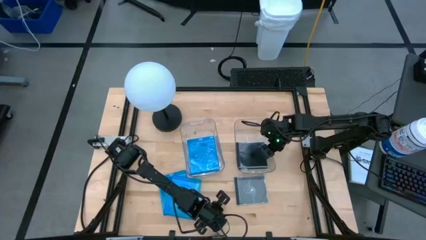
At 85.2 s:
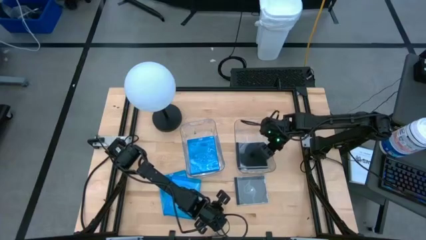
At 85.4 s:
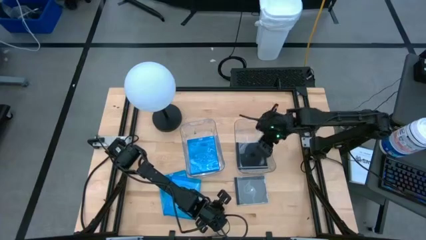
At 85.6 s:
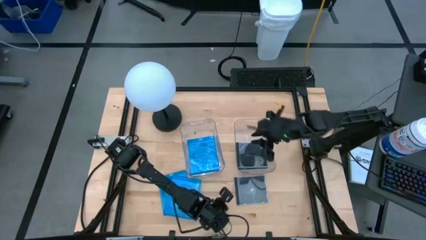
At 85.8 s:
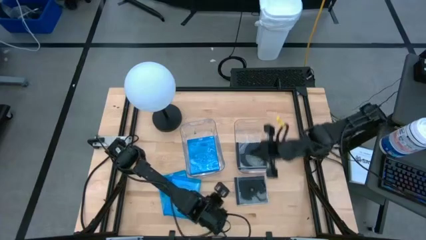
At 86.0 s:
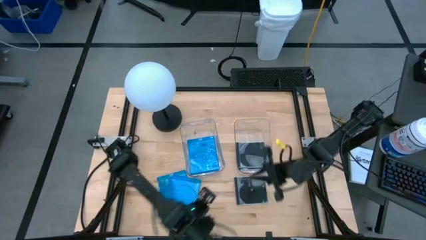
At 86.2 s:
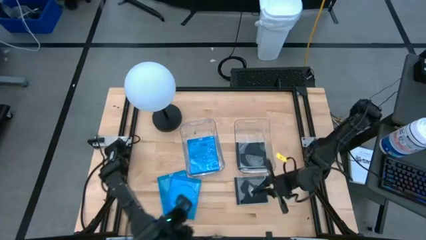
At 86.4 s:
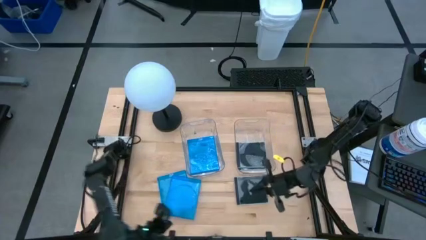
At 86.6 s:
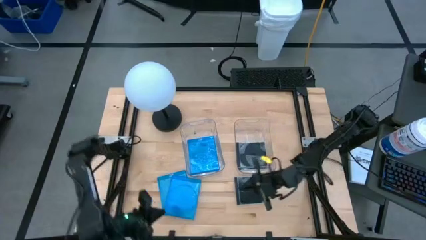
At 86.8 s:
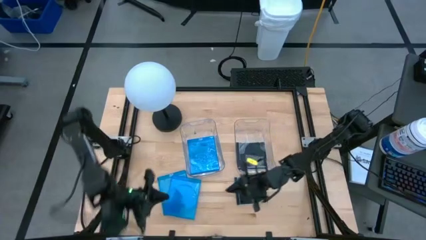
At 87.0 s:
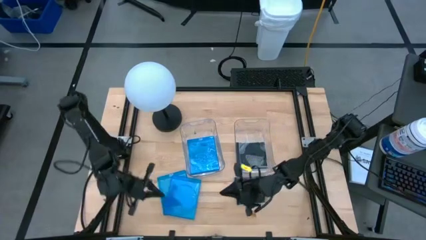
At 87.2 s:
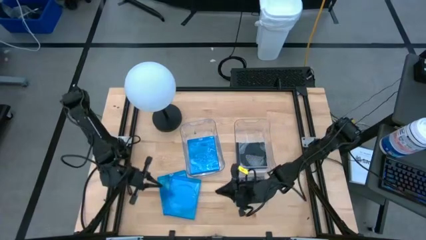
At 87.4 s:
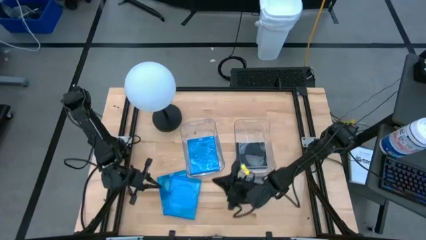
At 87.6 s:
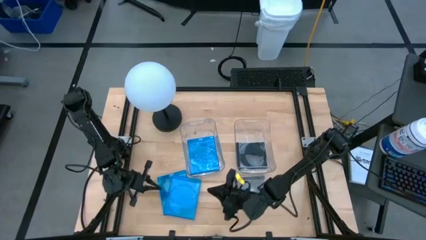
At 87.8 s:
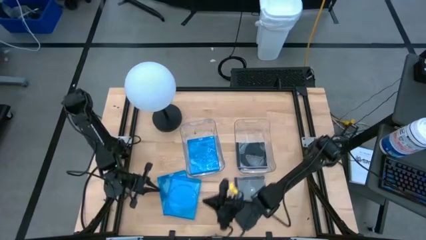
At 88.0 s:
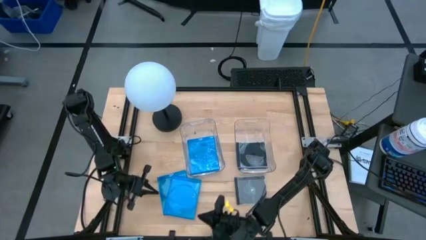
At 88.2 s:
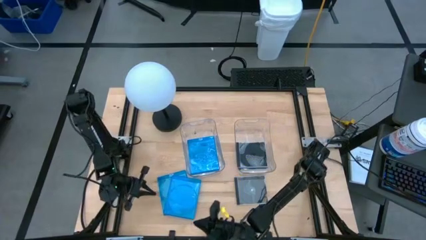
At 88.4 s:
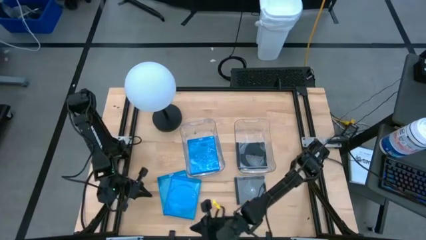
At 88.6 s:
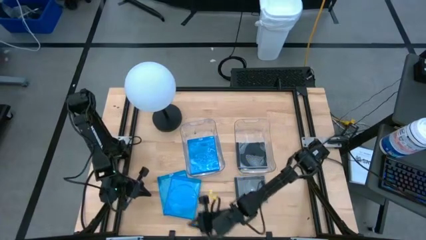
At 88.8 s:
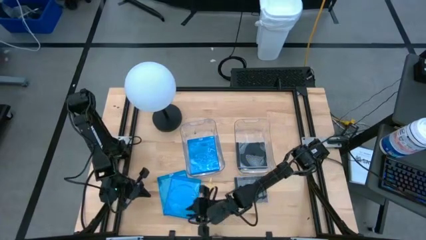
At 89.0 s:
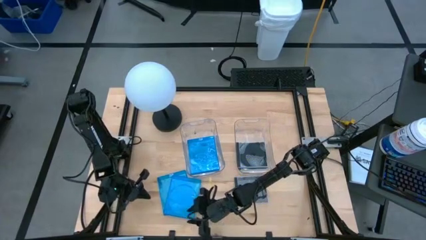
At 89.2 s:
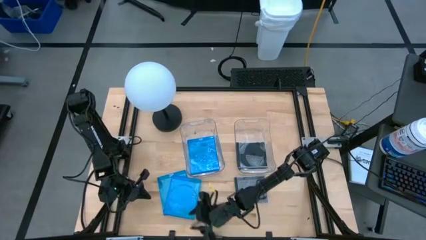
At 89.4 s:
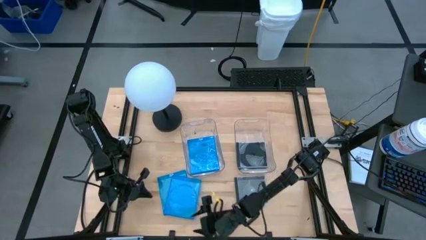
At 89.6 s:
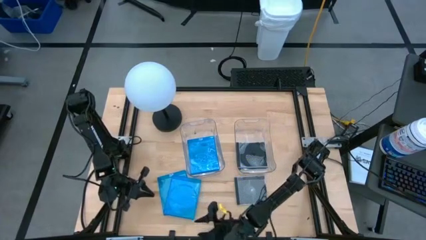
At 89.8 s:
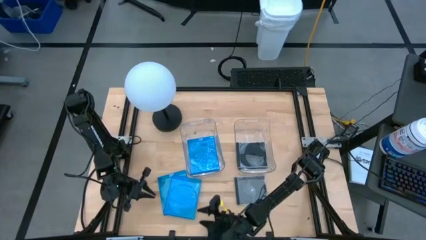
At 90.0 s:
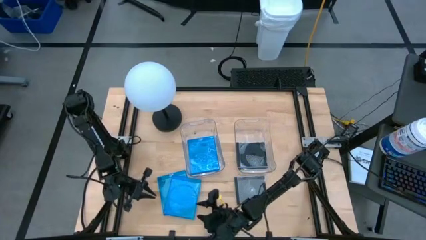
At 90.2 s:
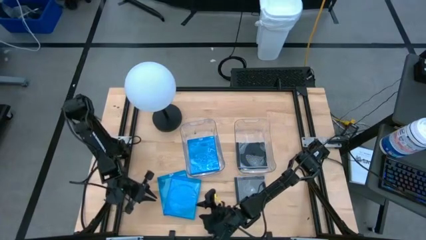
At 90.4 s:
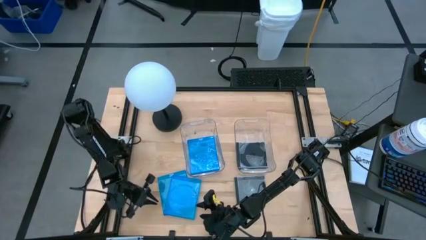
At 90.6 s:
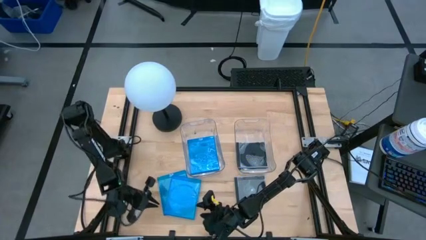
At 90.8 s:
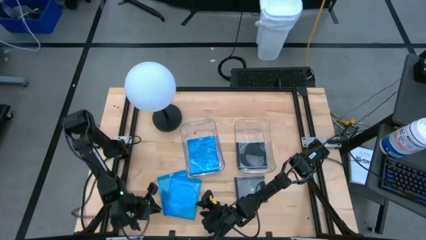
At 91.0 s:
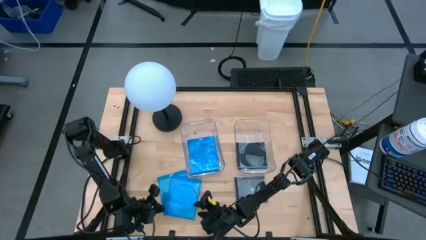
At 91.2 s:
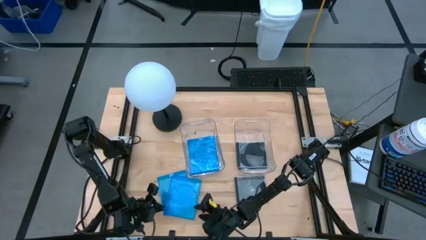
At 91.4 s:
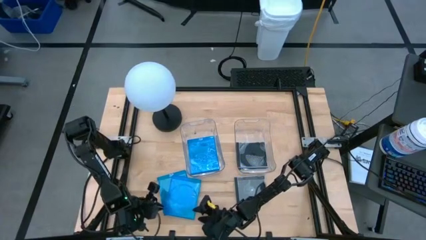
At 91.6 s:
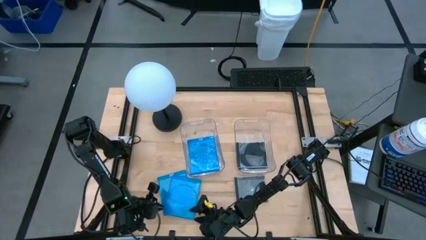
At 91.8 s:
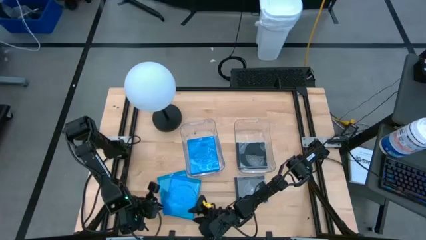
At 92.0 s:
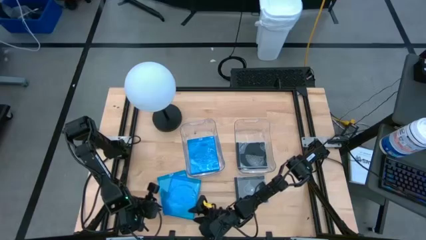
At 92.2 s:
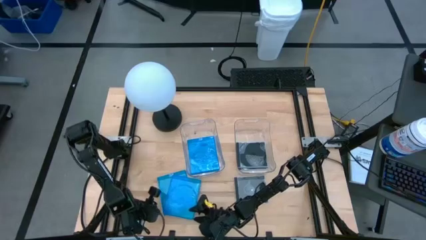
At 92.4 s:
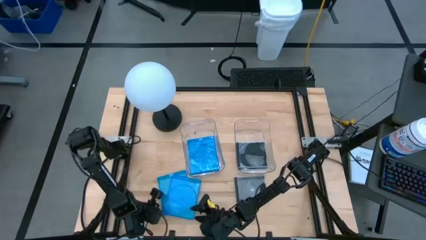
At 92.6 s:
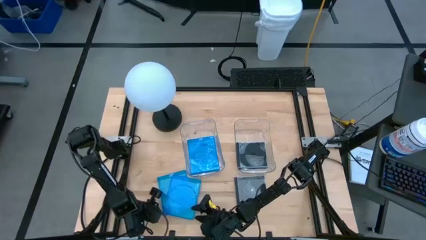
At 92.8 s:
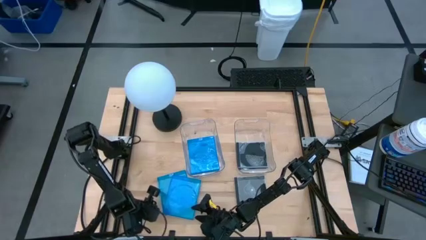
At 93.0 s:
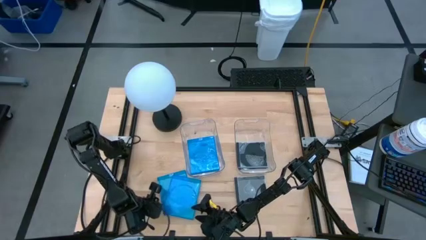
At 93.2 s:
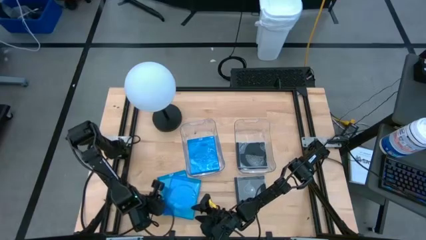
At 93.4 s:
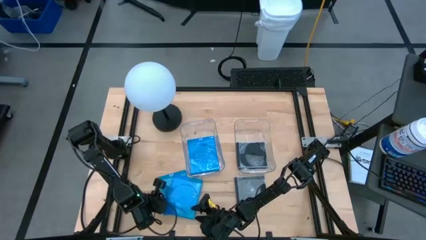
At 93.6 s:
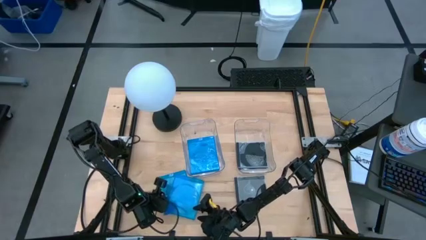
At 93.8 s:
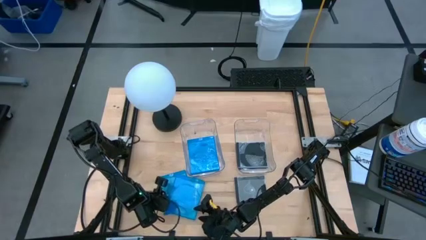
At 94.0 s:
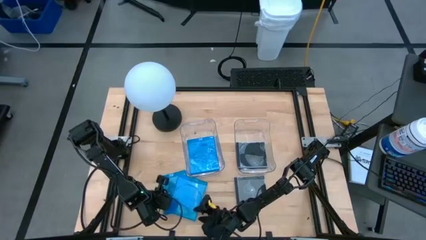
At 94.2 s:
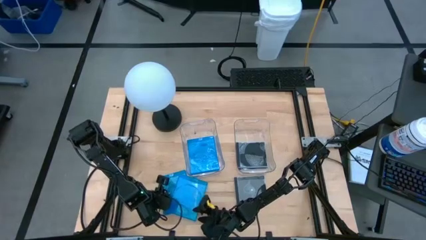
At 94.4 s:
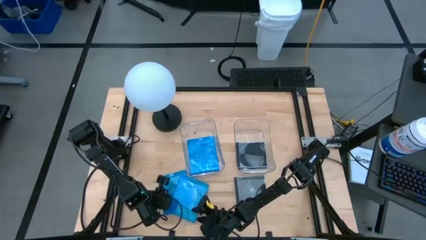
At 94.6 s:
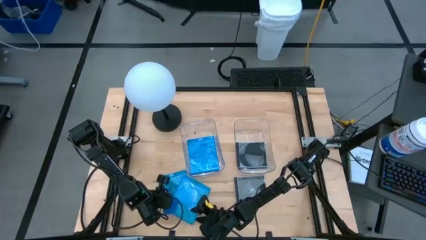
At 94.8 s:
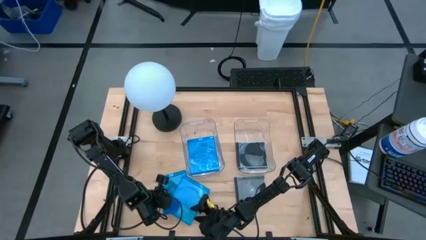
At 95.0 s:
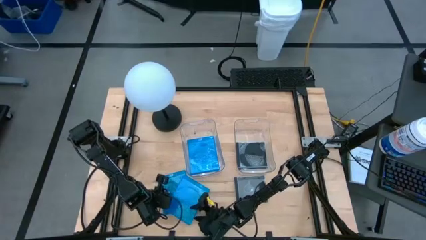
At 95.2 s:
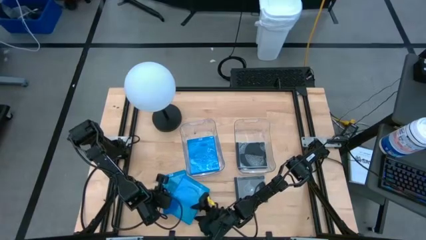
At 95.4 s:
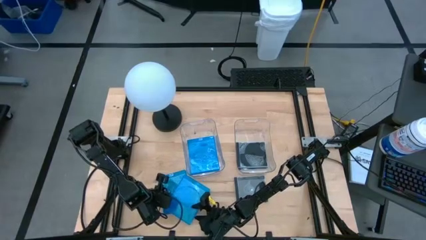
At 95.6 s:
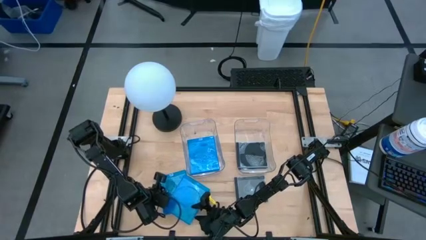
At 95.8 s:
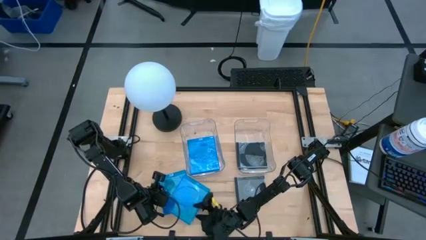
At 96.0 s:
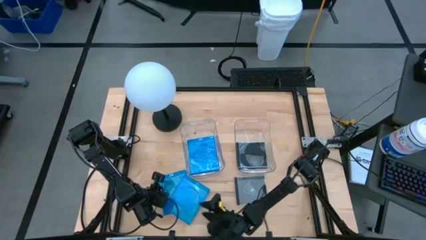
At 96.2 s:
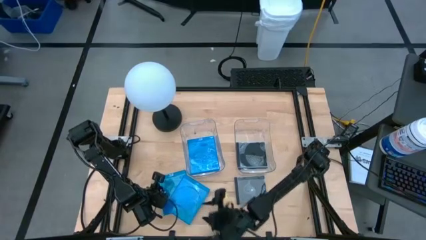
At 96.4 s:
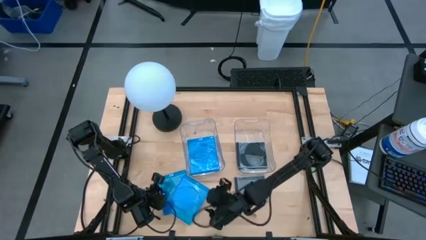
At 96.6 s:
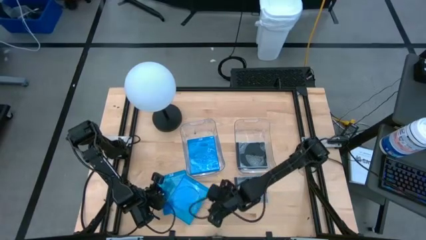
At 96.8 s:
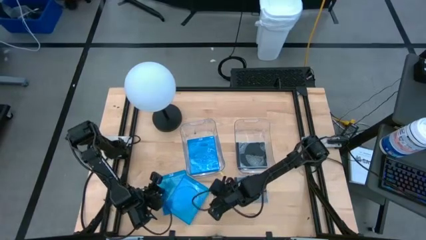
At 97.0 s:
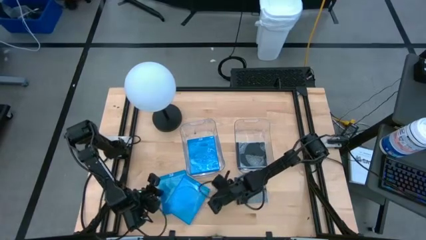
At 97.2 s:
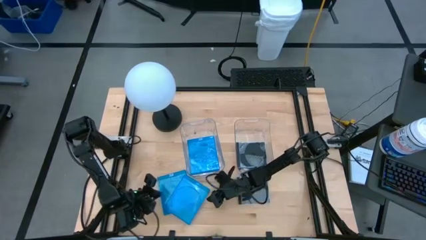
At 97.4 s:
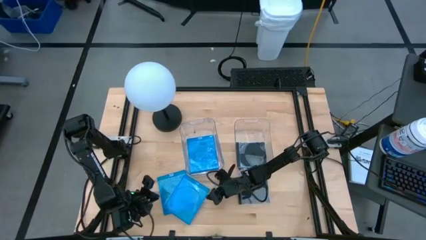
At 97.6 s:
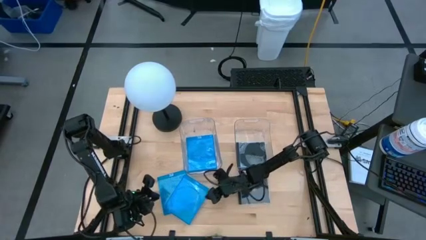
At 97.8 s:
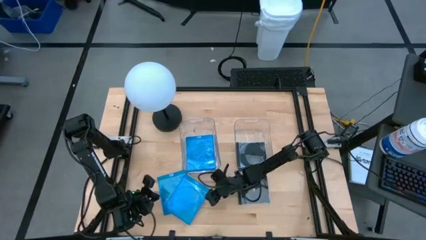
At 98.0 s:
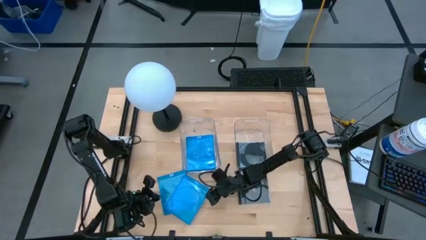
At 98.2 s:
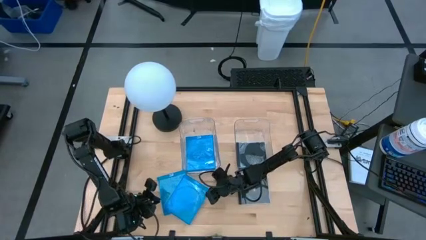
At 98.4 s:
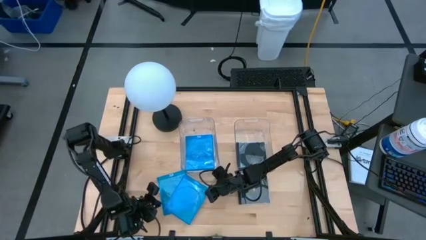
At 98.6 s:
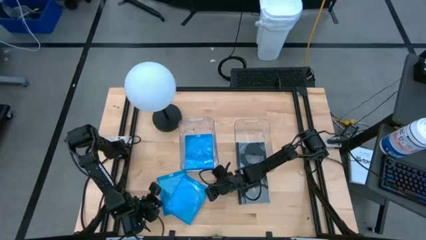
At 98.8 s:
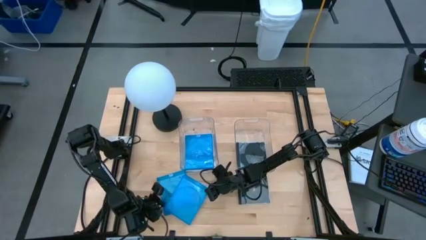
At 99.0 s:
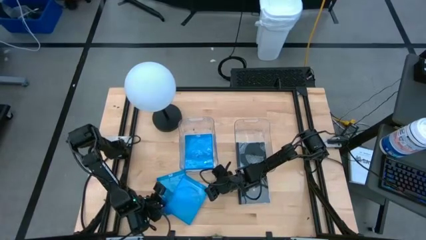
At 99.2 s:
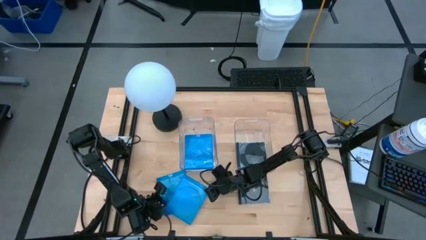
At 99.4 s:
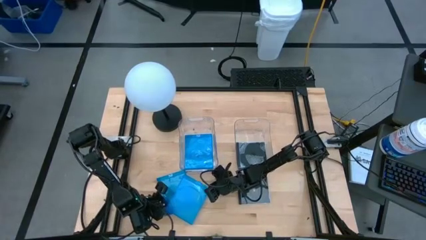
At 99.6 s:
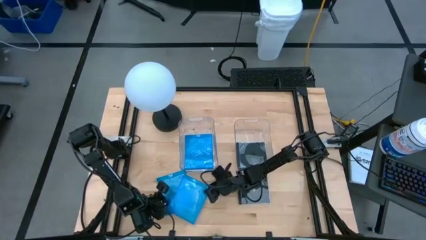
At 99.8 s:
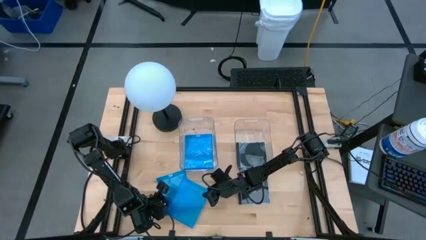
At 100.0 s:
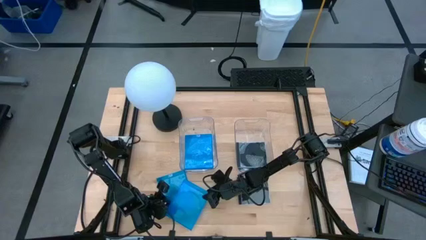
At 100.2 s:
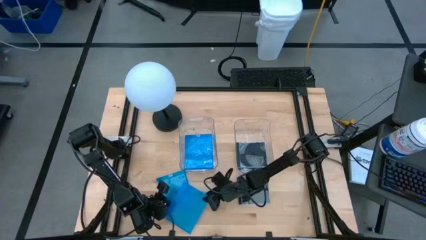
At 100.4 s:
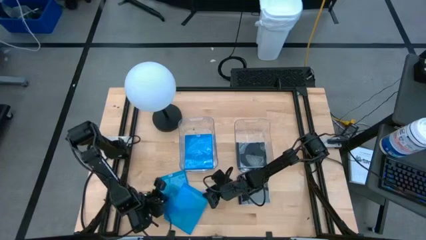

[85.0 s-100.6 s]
Task: Pick & place jewel cases by type
Put the blue CD case into the left transparent bin

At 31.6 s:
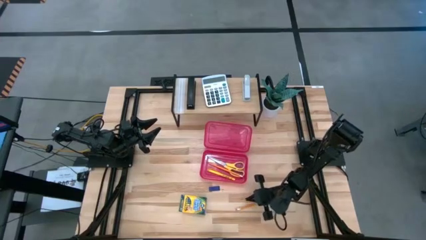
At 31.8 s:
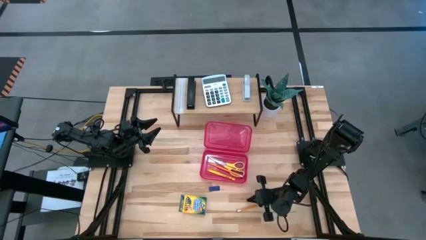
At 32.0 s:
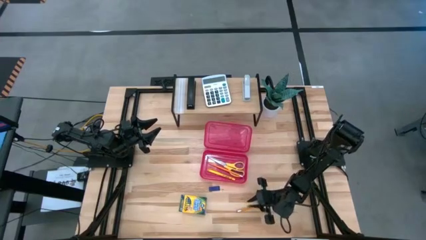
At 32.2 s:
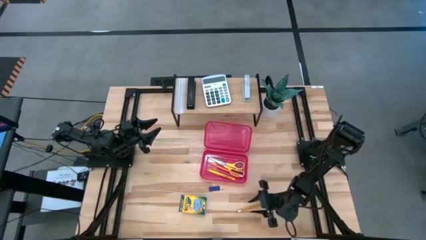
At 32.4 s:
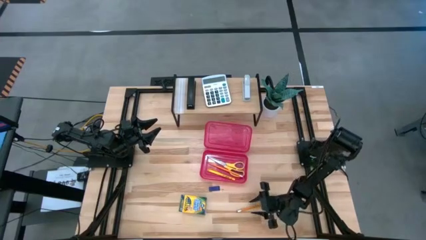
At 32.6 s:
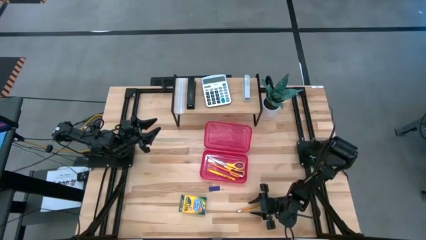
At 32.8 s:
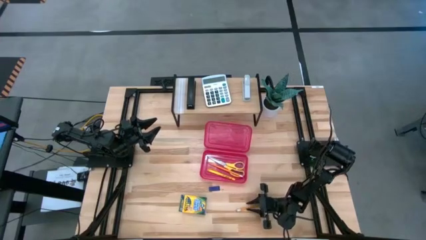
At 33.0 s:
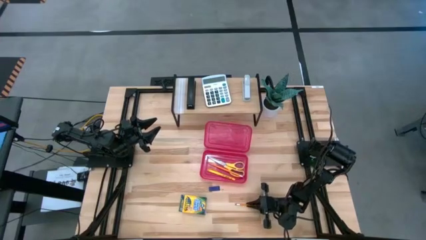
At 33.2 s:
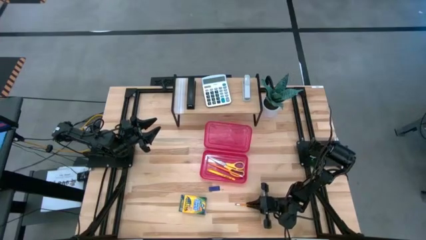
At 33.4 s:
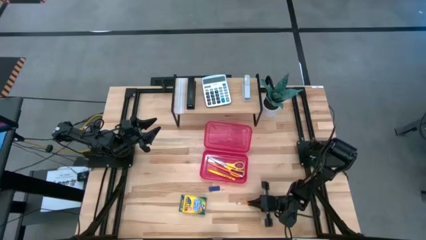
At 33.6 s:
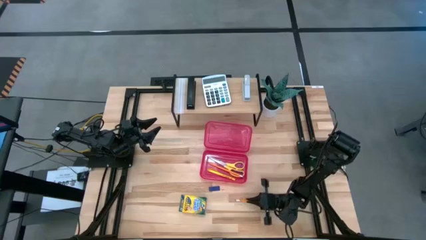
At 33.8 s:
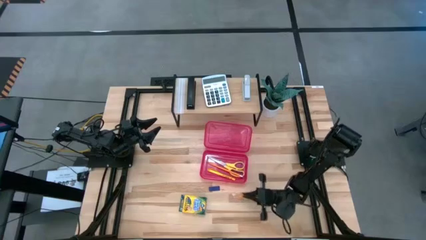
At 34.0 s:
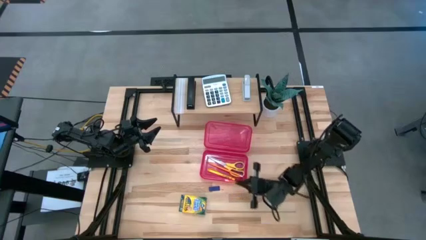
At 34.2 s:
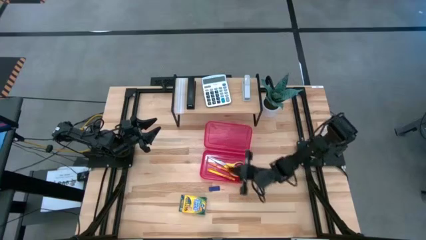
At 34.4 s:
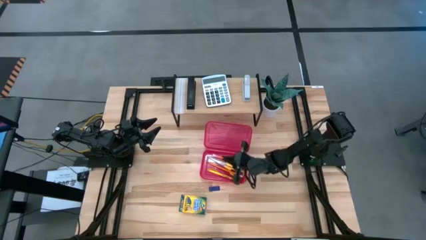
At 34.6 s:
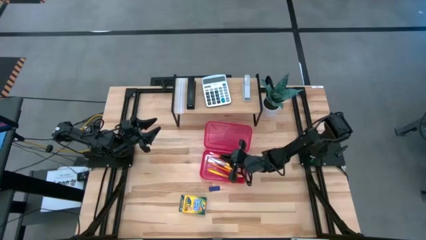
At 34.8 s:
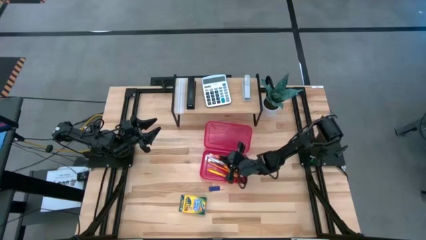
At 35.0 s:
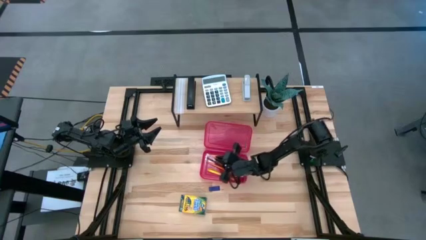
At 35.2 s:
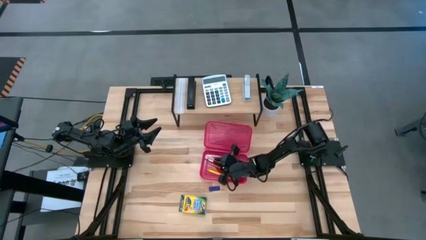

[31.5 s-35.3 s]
Task: Pack school essentials
Put the orange pencil into the red supply box
